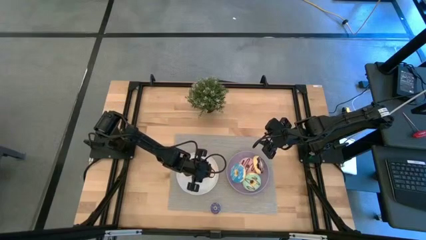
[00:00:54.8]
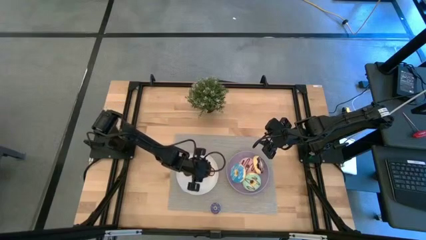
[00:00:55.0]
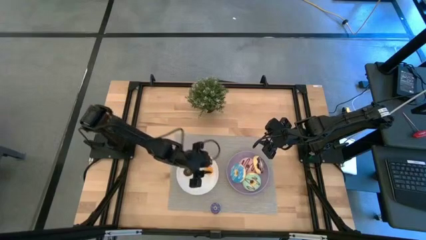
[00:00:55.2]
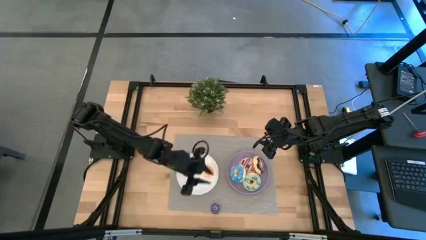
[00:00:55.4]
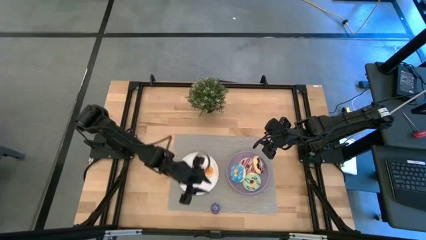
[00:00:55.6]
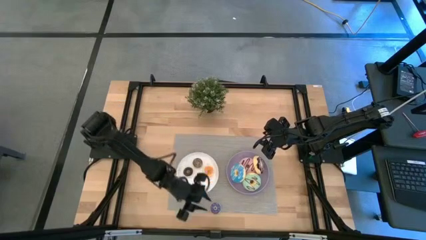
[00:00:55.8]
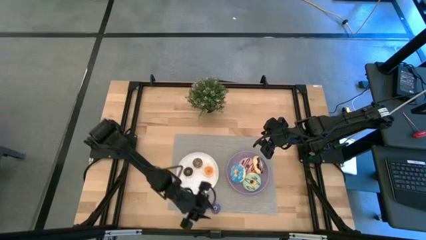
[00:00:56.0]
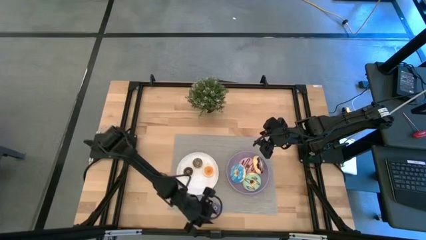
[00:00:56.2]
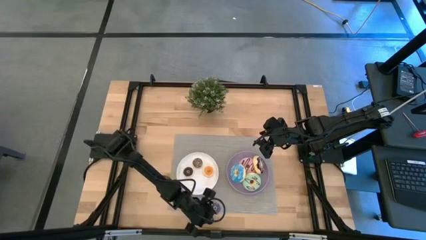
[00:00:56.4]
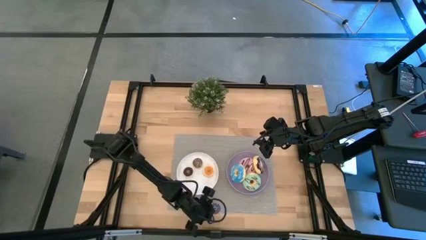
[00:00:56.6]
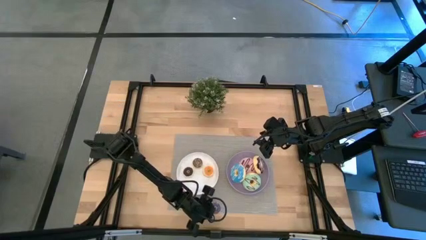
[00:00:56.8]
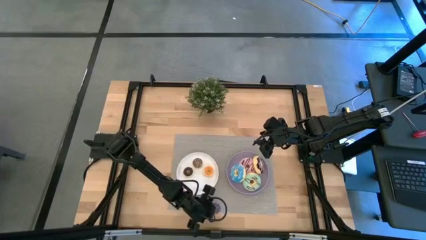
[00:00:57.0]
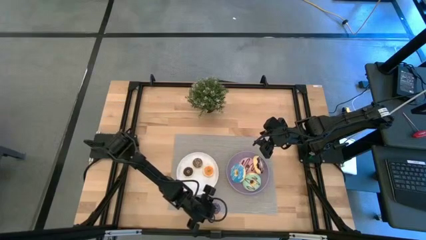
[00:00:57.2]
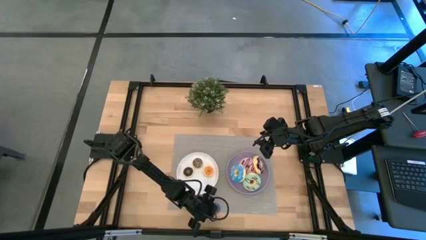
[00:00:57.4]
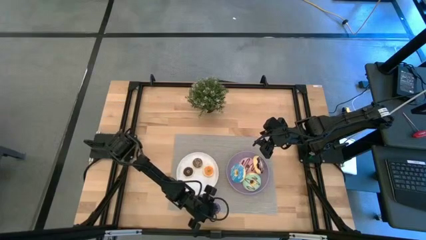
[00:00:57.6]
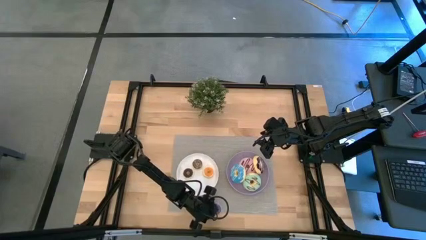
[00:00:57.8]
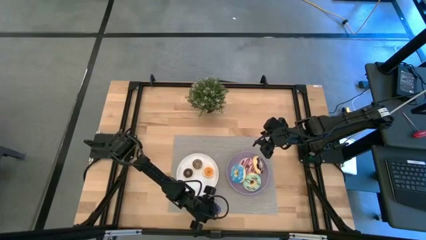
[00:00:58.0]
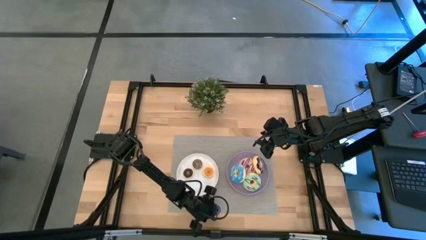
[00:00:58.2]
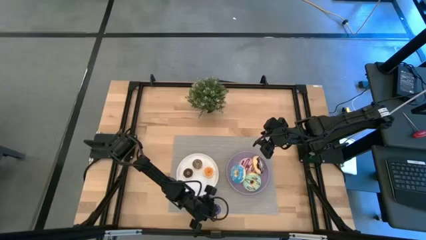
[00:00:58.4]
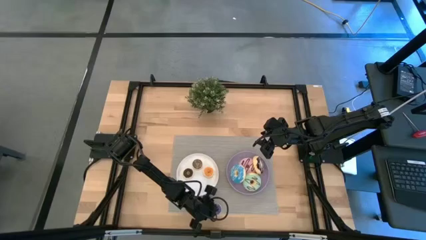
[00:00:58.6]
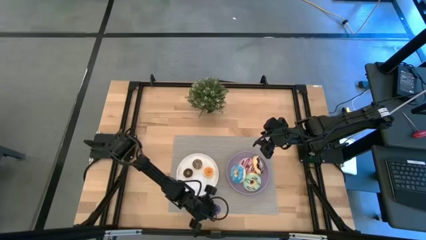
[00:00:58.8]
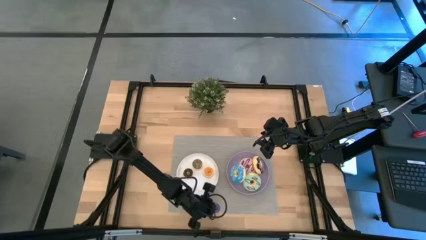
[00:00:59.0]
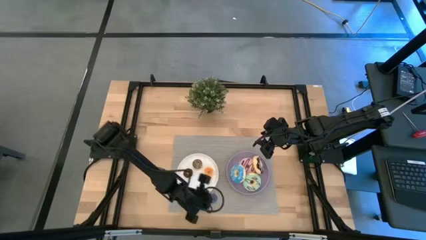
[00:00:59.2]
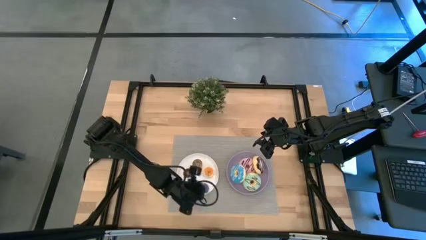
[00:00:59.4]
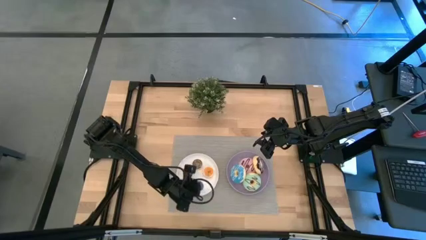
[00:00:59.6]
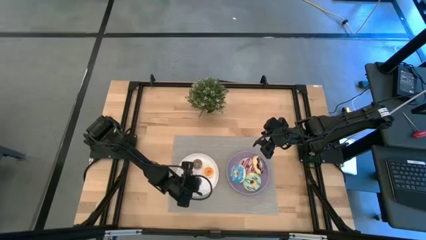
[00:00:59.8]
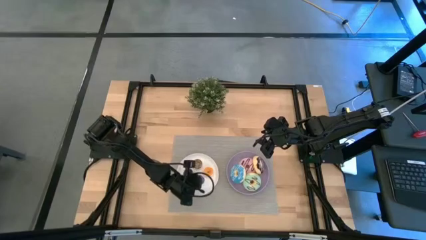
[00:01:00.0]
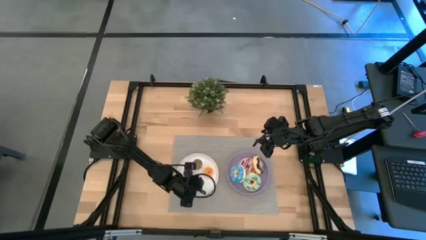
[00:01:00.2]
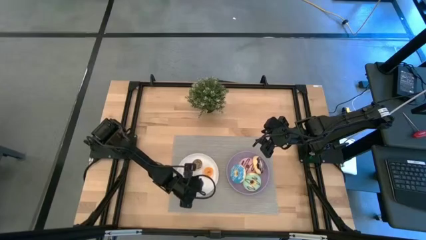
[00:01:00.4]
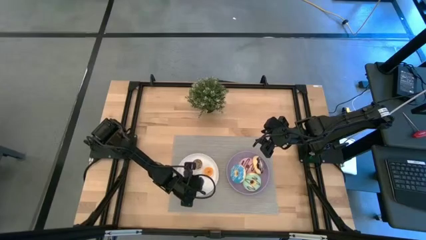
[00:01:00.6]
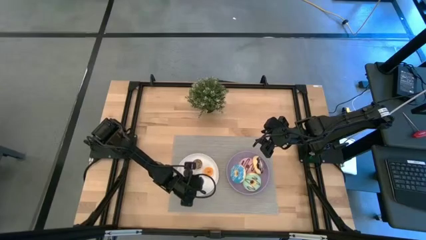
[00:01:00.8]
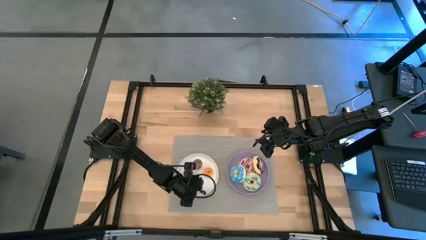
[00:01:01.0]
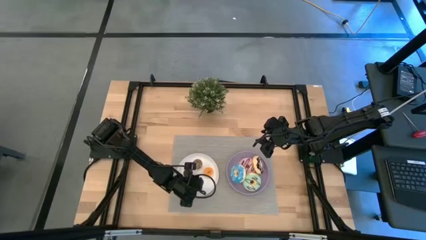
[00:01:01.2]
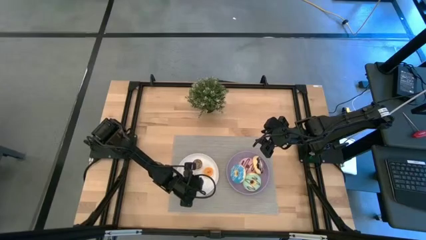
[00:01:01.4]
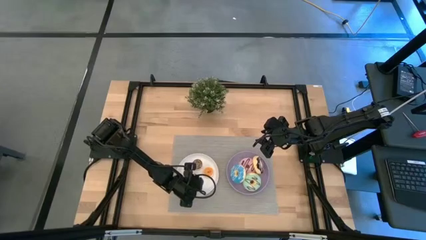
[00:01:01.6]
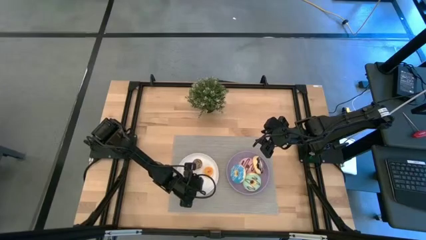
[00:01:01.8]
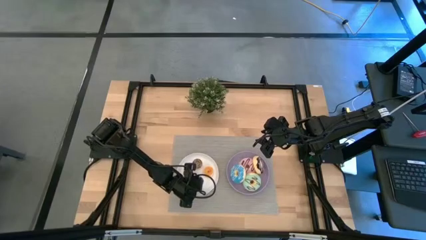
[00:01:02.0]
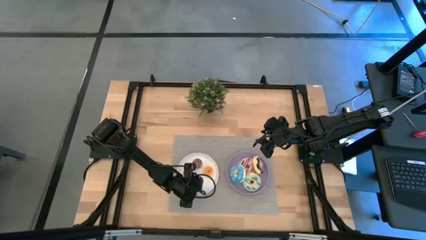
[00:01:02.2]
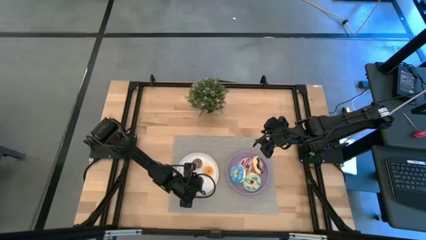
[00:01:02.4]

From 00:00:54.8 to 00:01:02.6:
Task: Pick & Place donuts
Put the small blue donut on the white plate

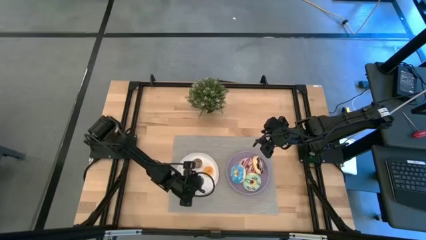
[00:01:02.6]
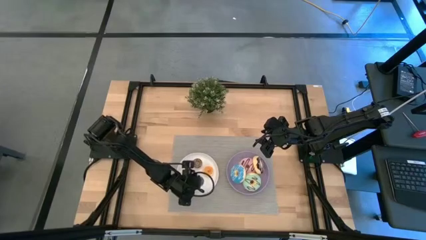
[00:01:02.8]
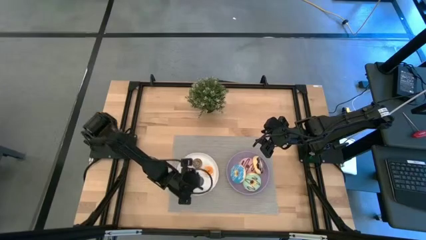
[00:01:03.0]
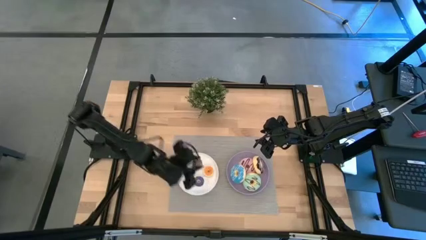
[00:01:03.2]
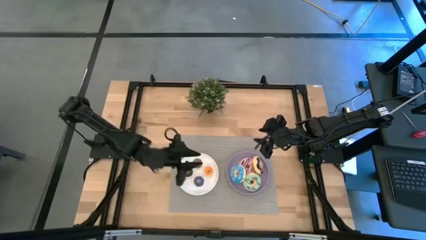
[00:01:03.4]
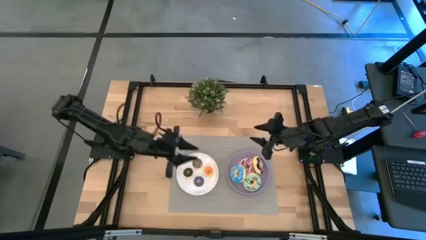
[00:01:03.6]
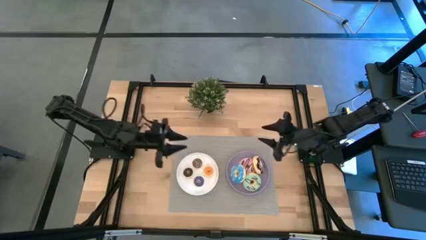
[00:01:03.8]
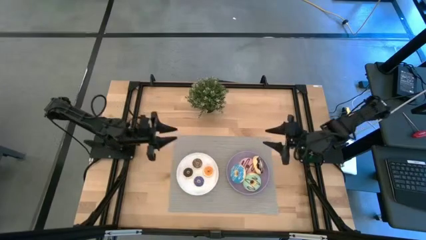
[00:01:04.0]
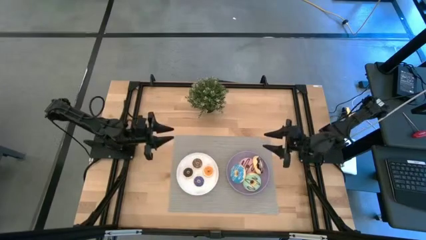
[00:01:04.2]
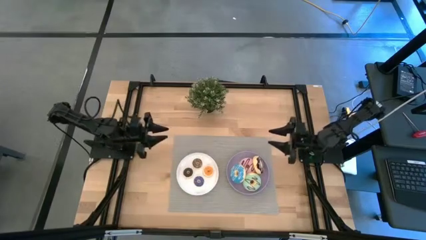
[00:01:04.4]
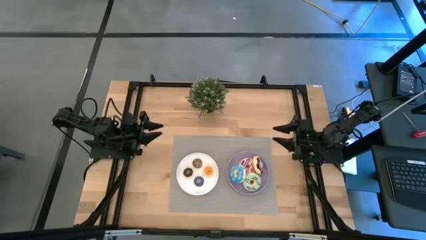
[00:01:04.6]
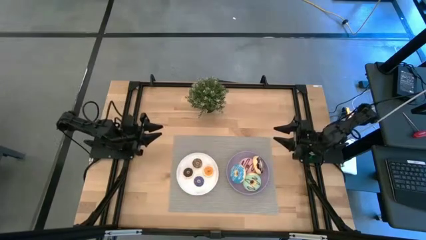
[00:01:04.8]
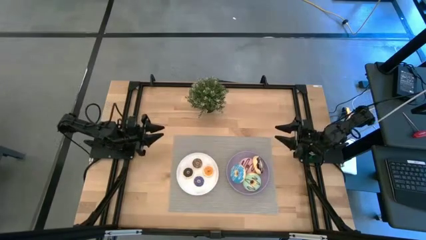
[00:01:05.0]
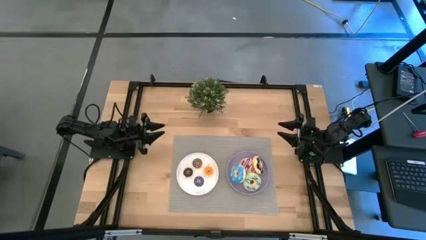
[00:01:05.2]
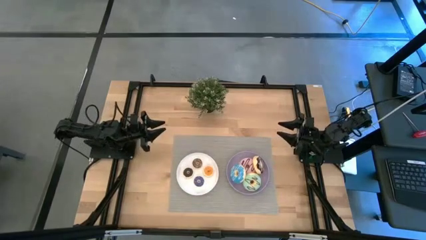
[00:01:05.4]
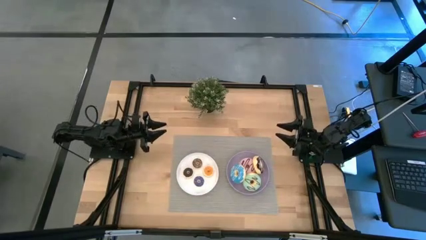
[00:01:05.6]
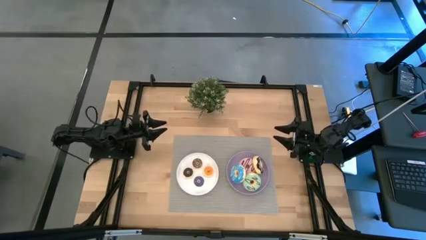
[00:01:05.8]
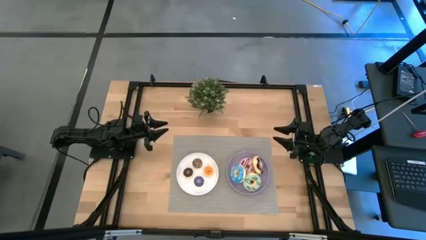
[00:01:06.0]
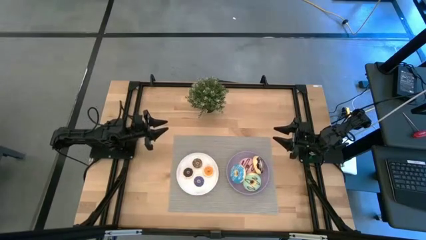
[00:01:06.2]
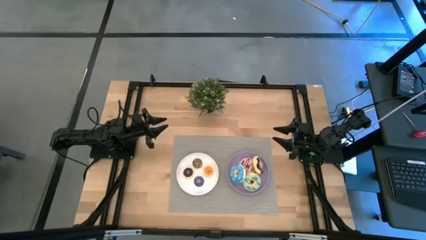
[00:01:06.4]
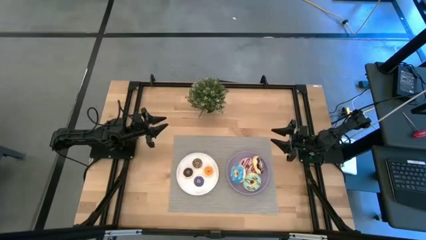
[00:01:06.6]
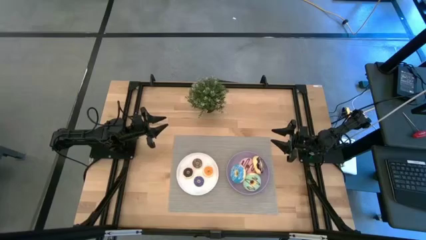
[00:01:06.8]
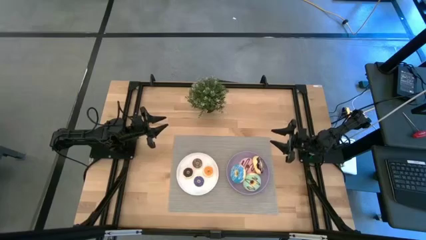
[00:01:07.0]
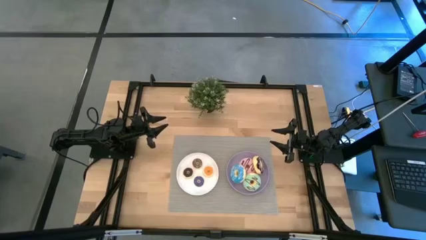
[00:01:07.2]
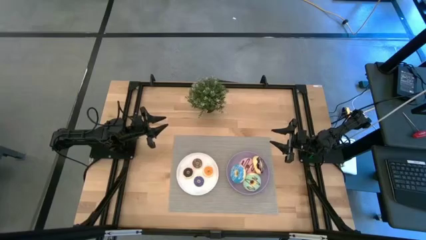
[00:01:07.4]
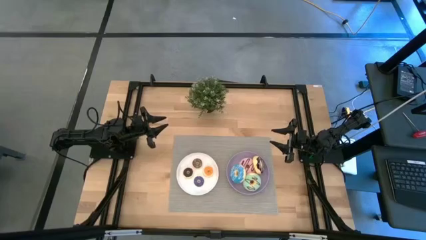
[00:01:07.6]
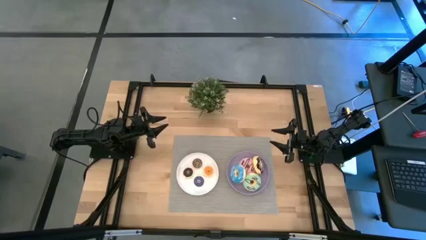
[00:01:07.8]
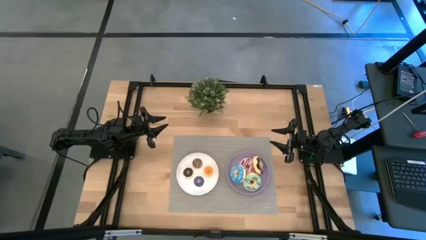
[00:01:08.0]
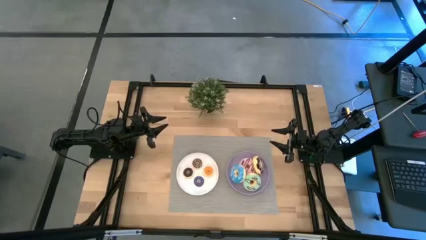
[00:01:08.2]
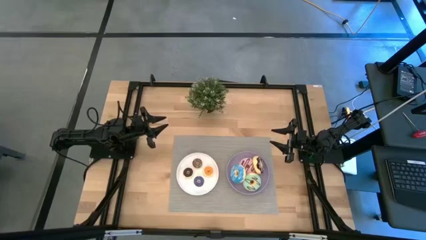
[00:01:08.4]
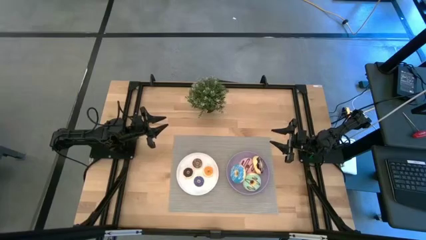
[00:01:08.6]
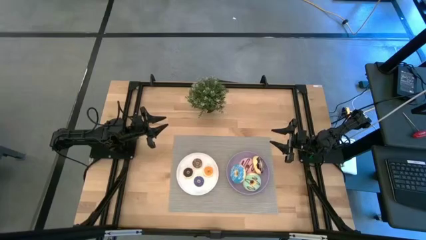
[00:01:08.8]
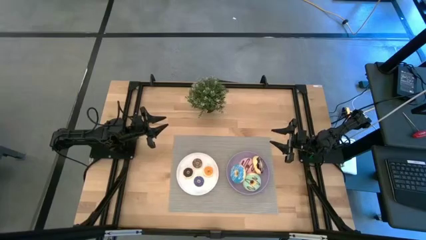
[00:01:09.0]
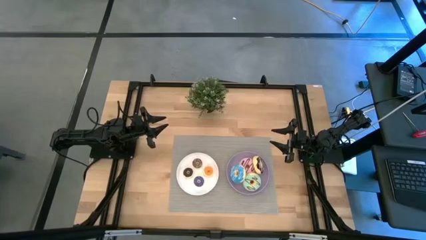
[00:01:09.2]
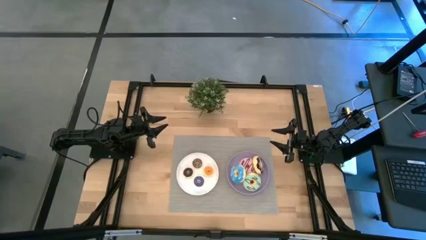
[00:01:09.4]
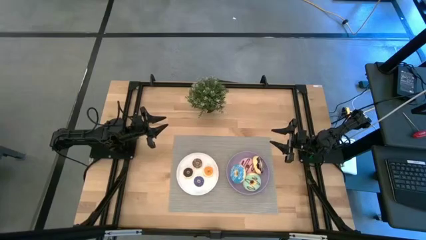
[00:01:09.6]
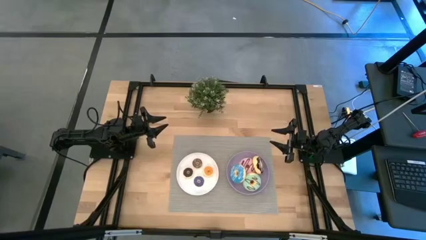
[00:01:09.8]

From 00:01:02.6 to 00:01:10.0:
Return to Home Position
